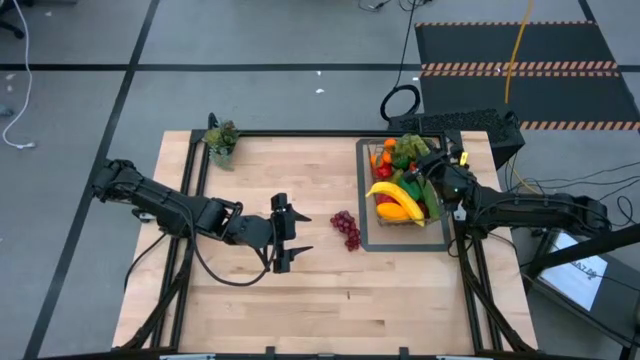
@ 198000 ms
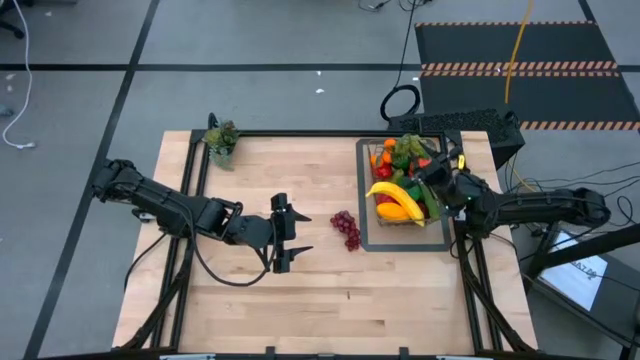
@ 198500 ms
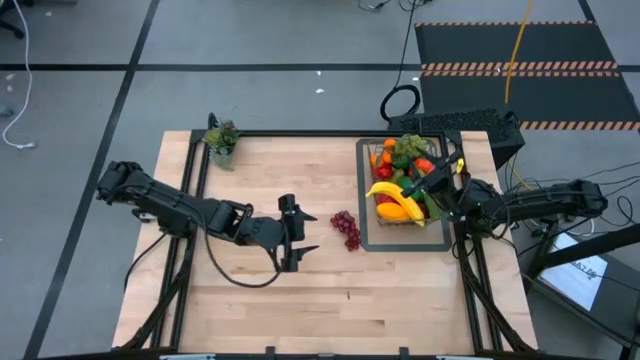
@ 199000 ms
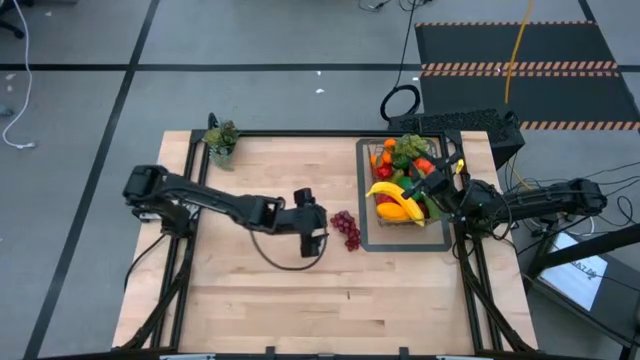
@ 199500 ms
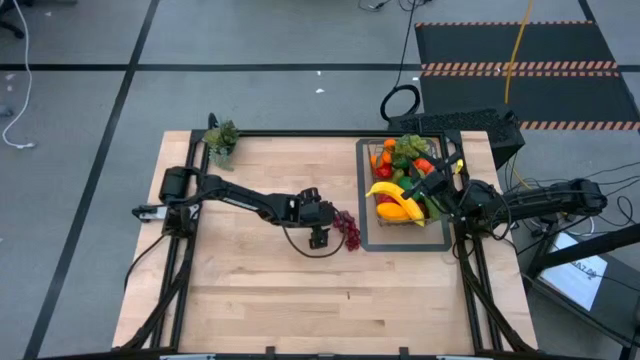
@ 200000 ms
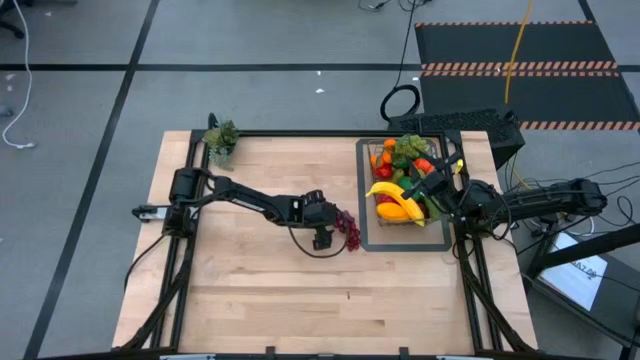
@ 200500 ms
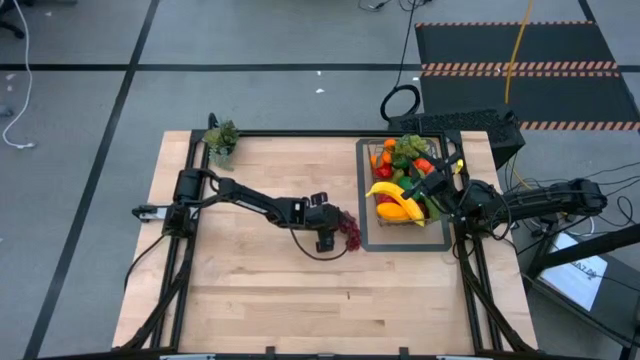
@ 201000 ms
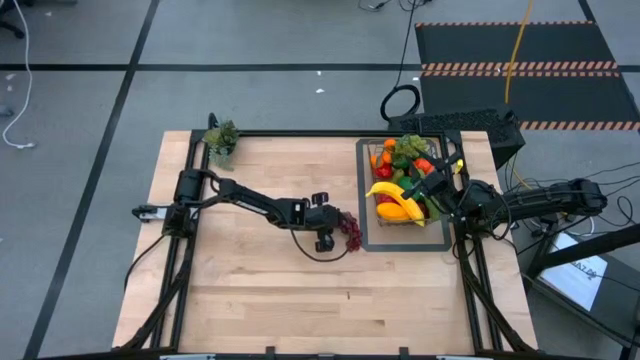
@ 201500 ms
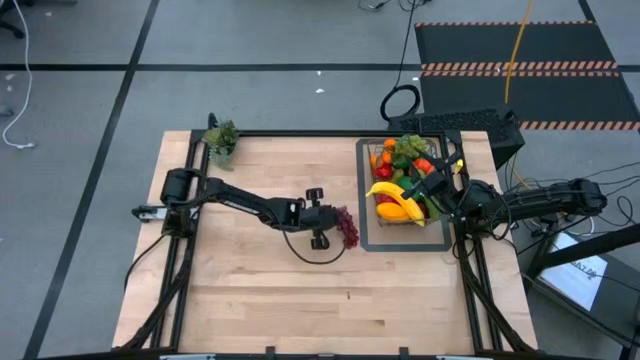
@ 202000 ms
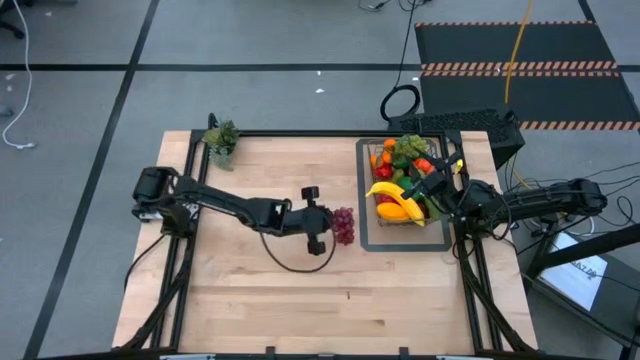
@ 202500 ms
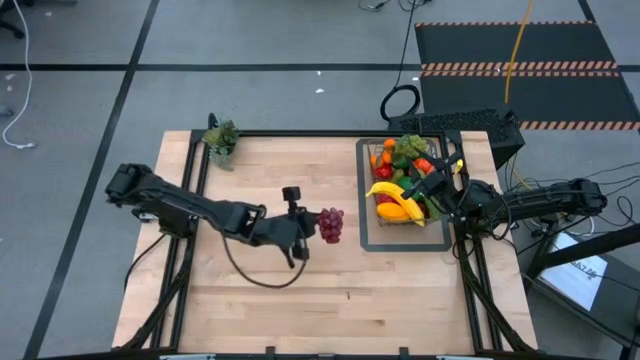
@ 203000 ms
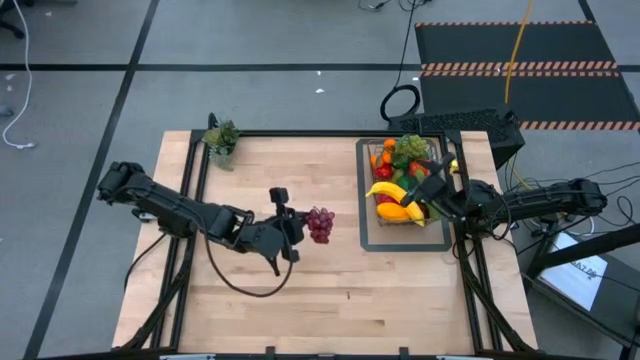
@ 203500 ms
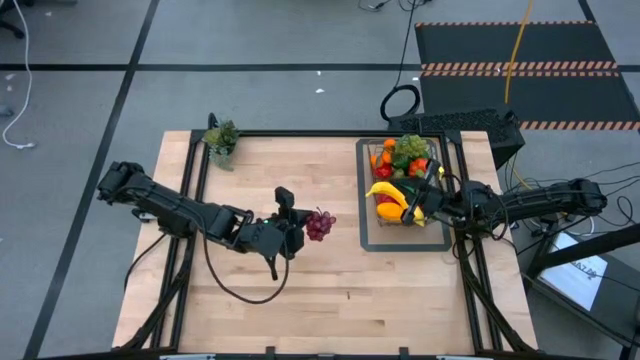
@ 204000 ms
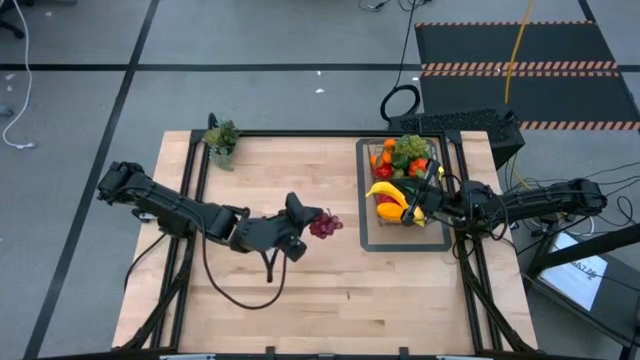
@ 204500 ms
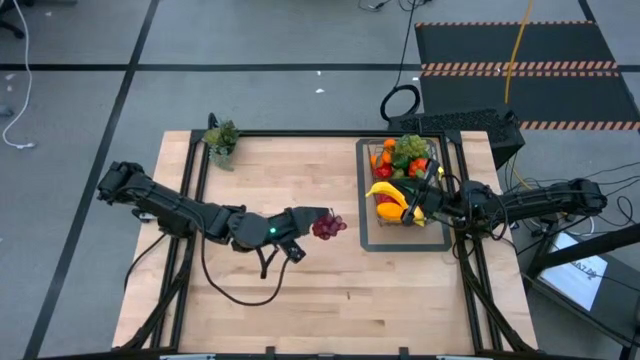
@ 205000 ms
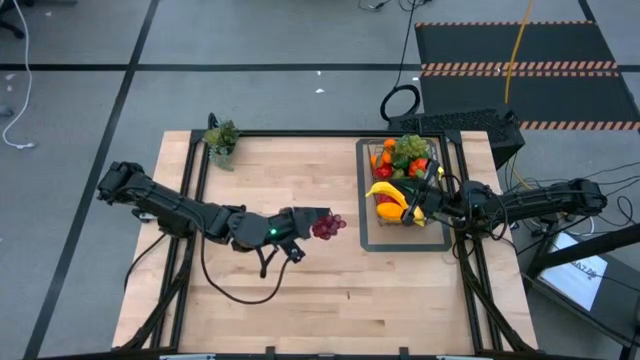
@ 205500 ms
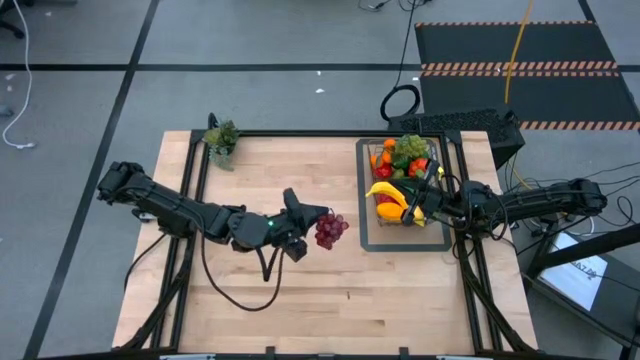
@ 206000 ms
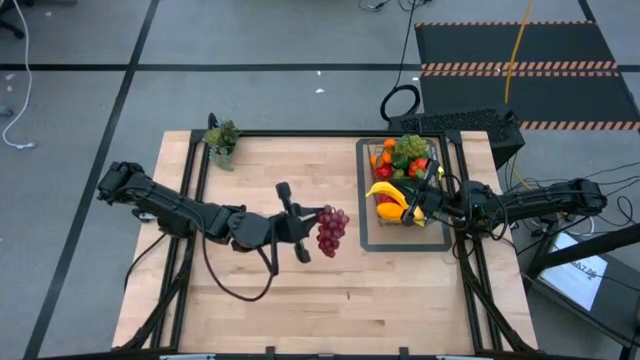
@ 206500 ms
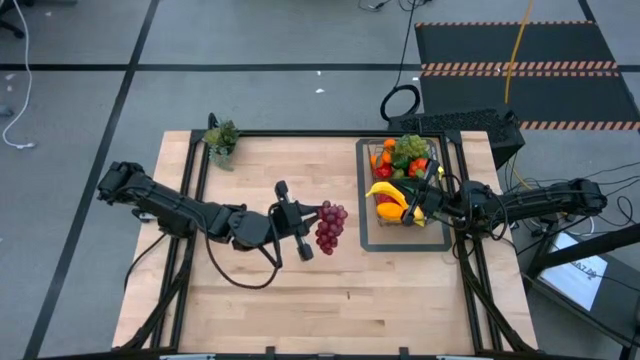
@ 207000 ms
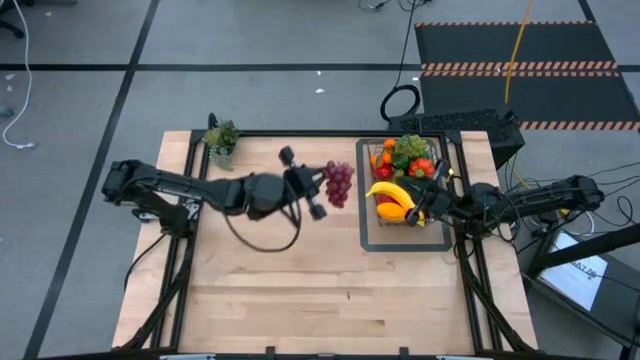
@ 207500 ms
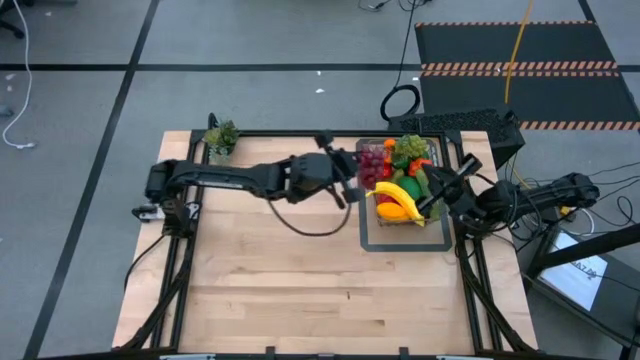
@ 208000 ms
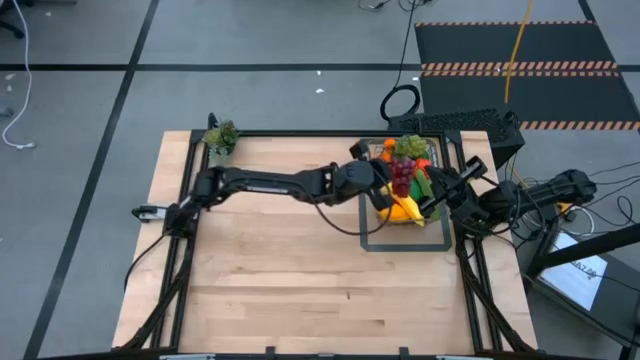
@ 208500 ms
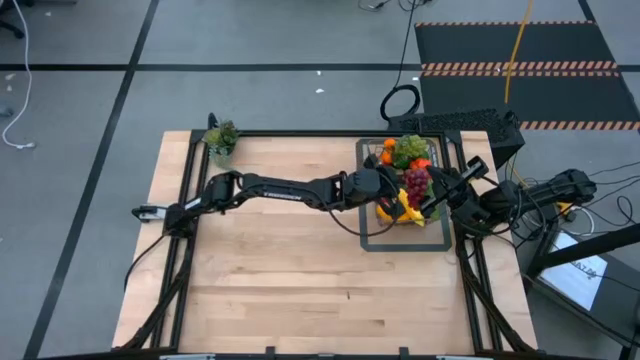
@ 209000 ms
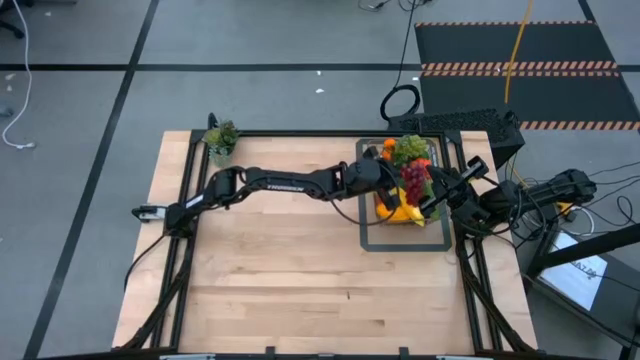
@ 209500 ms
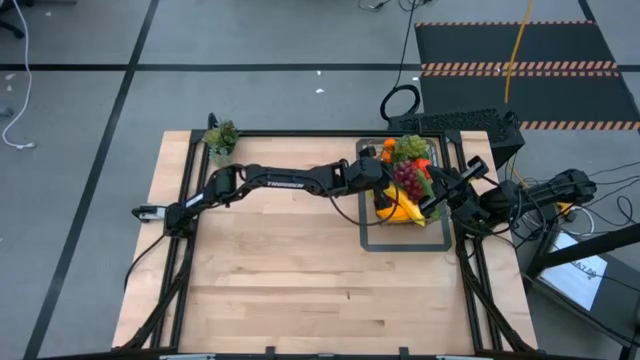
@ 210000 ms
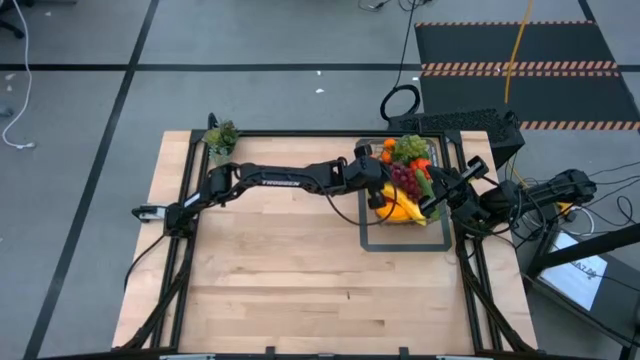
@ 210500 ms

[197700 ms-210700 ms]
Task: Build produce basket
Put the grapes into the gold wire basket

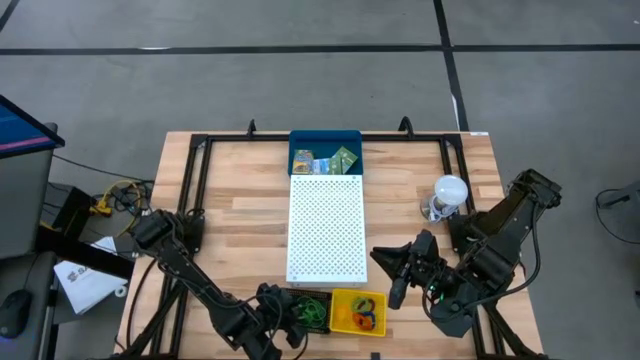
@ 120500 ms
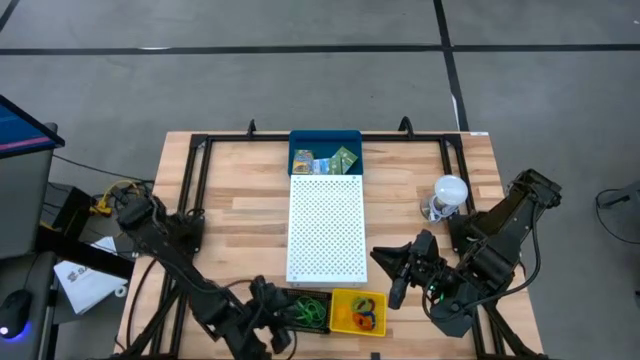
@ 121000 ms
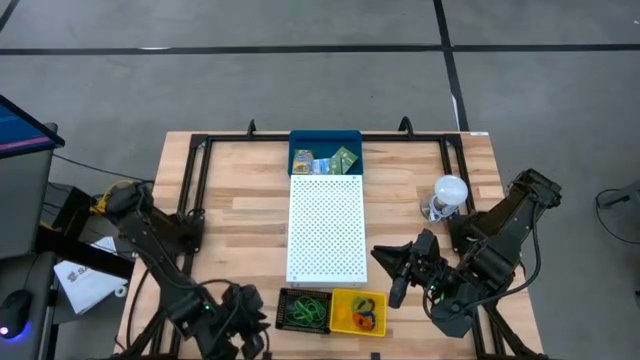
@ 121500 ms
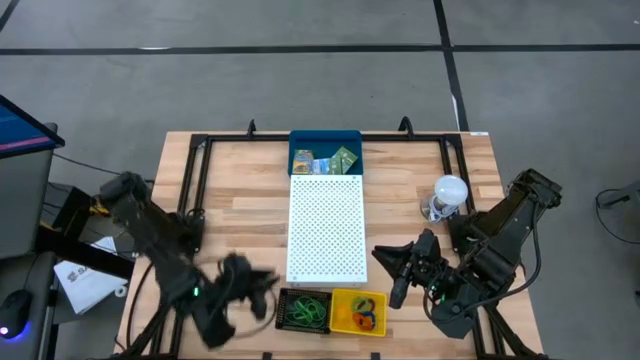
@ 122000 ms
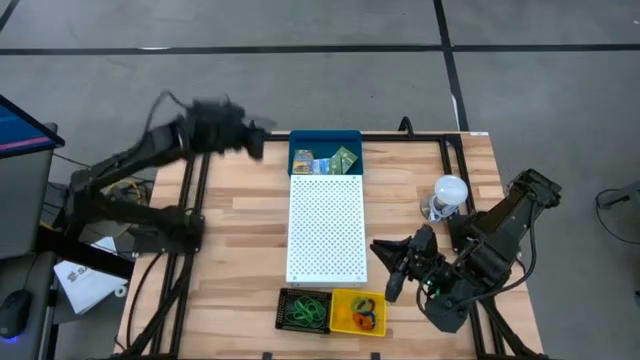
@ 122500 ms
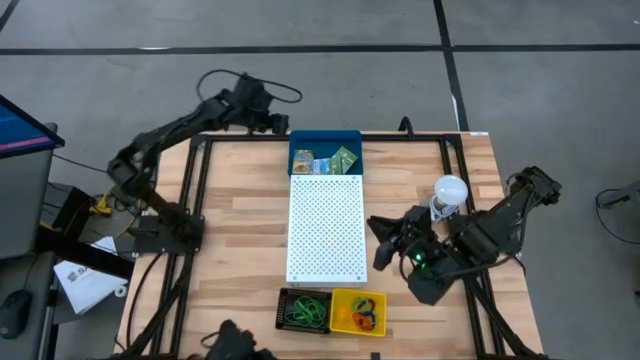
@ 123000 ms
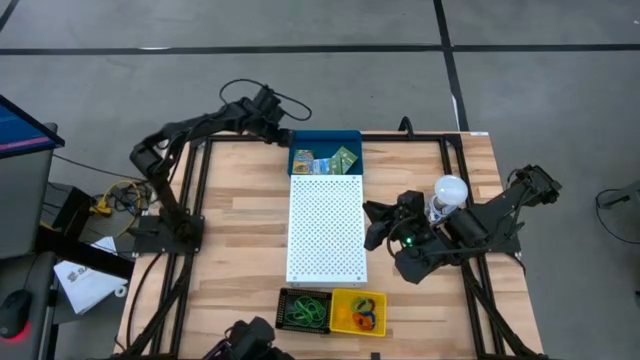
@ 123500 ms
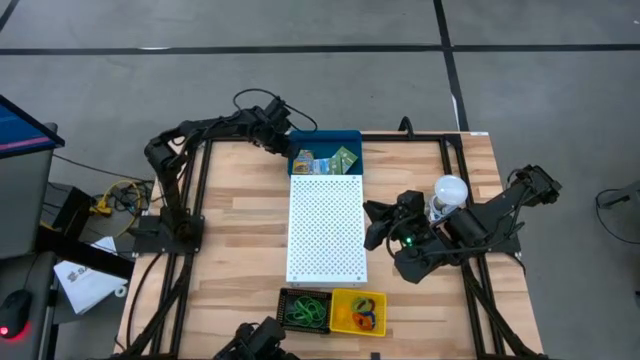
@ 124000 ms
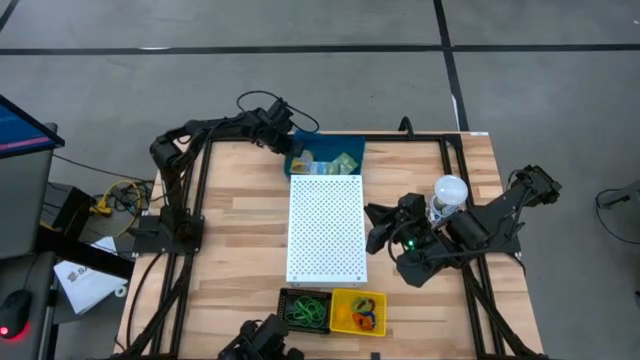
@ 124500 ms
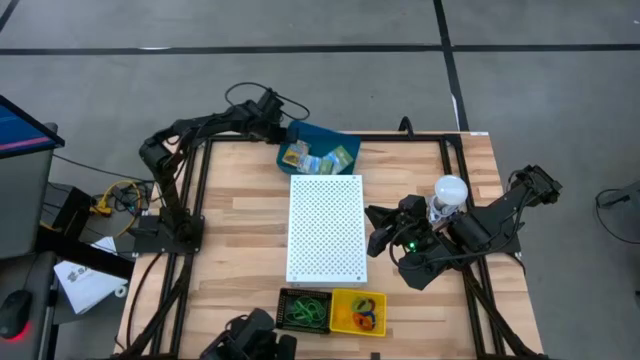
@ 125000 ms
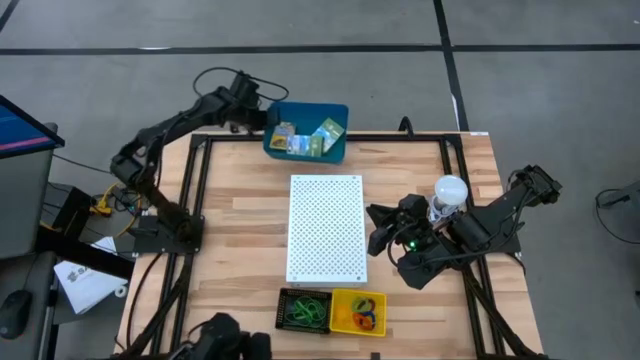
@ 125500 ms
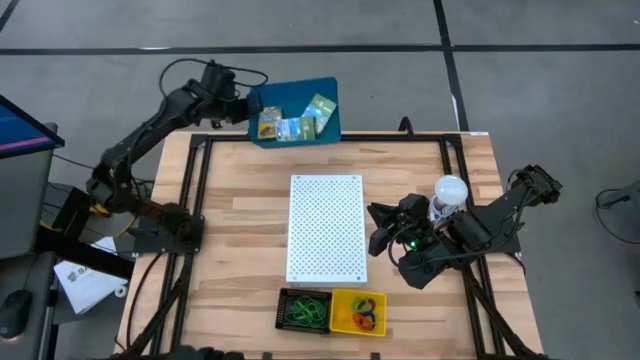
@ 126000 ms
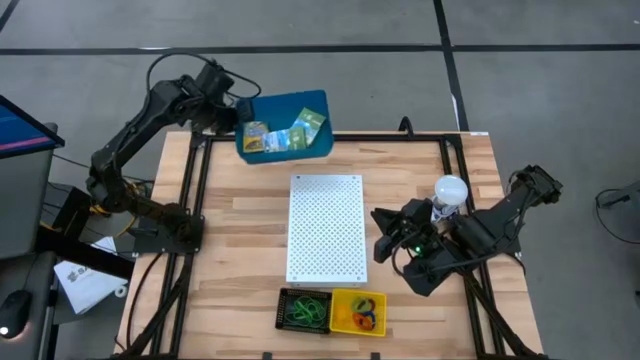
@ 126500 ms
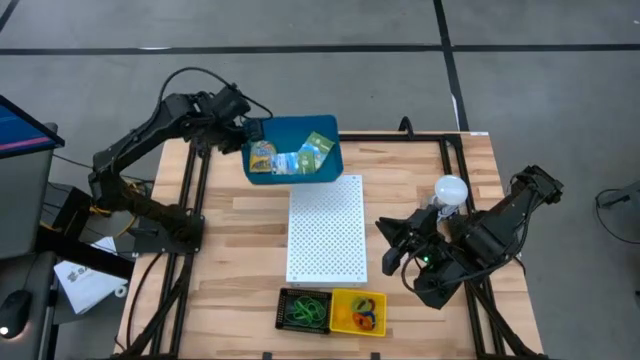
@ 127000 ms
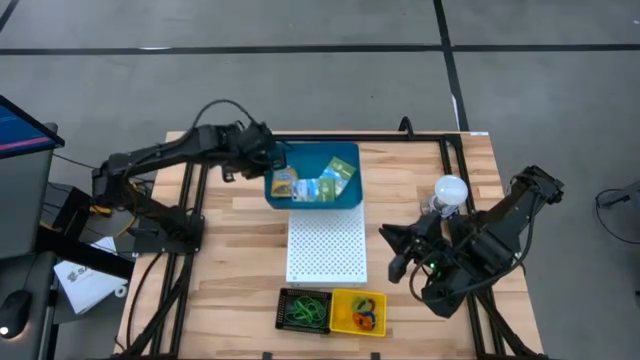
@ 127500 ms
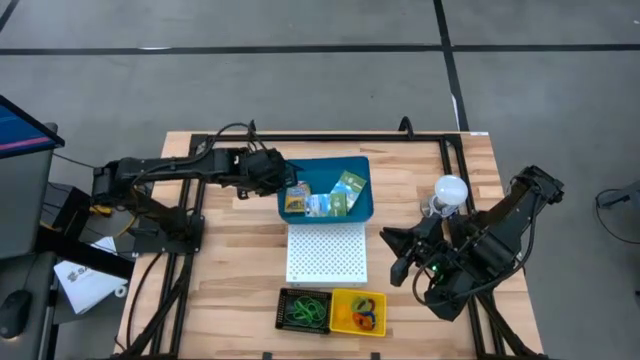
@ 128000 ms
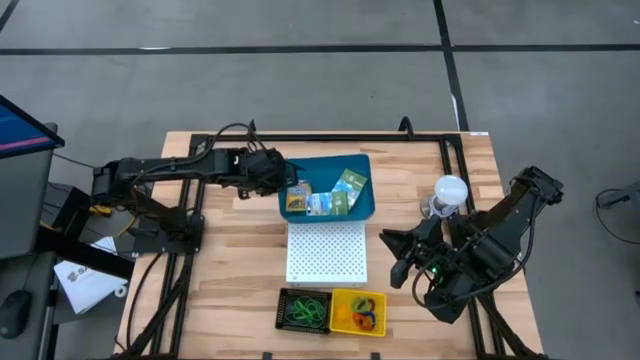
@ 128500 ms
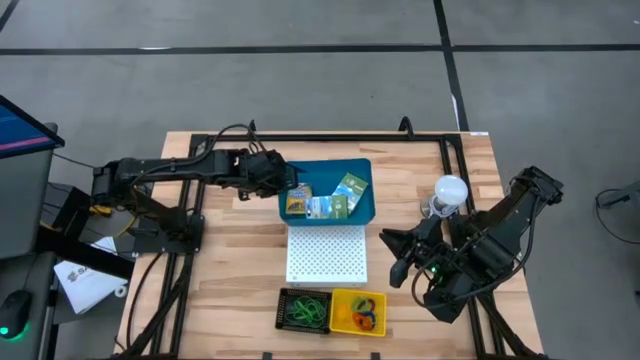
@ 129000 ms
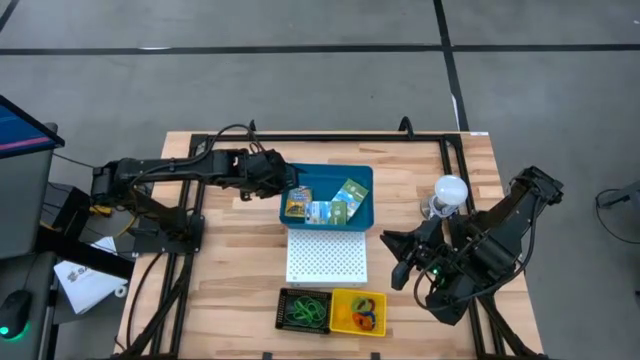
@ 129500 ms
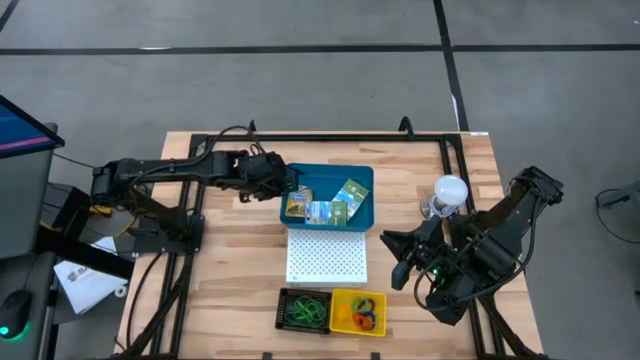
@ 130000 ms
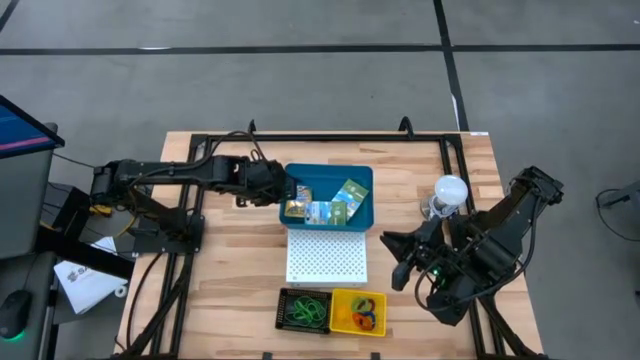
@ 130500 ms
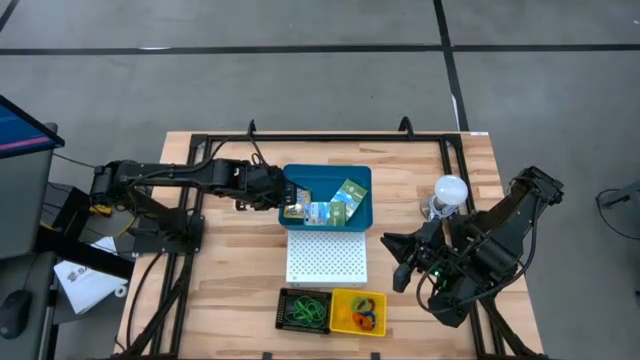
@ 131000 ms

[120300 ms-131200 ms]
Task: Pick & Place Office Desk Supplies
Put the blue bin on the shelf
